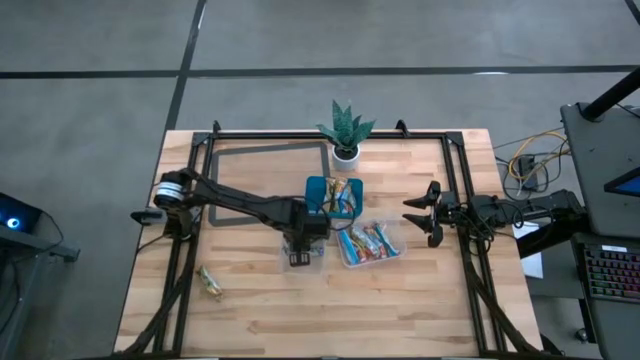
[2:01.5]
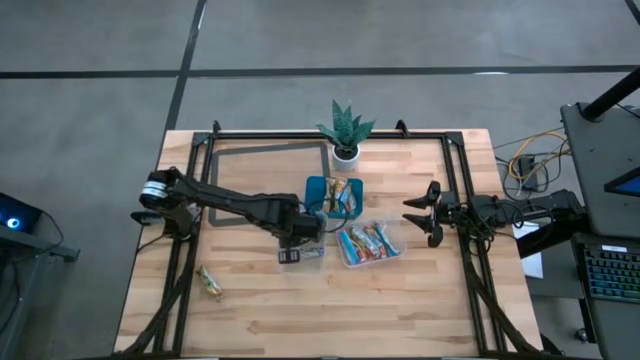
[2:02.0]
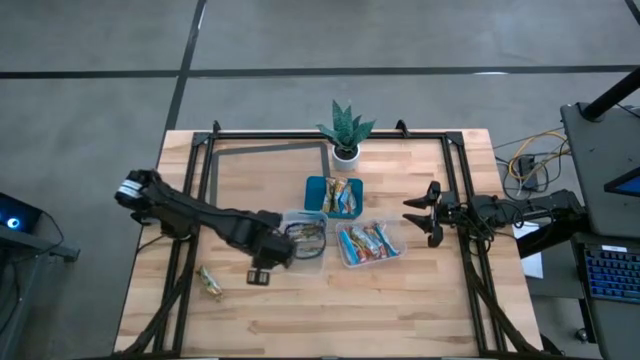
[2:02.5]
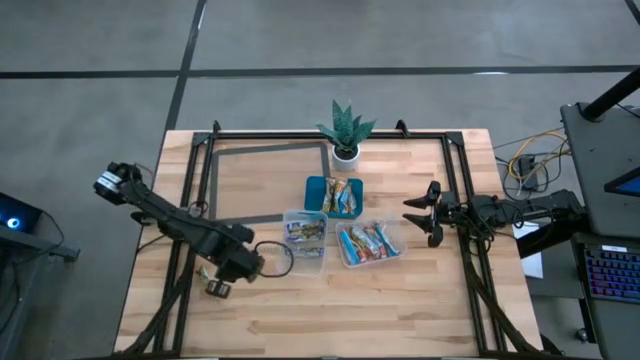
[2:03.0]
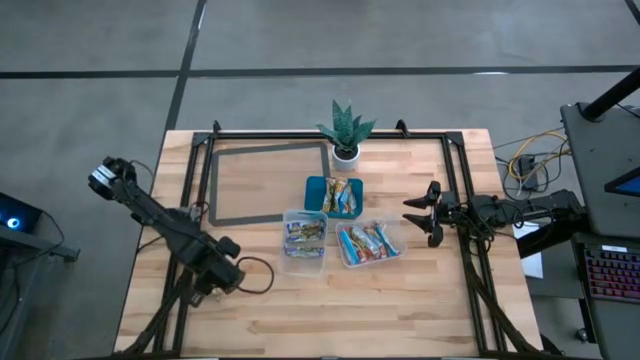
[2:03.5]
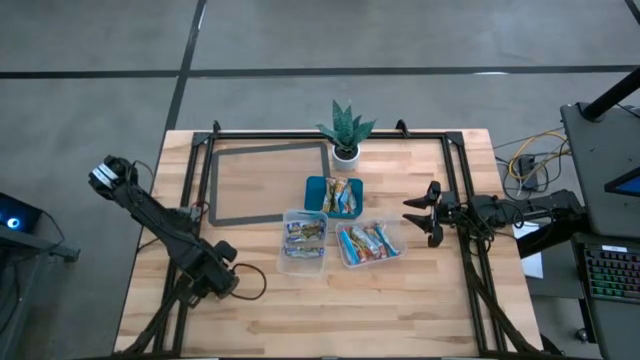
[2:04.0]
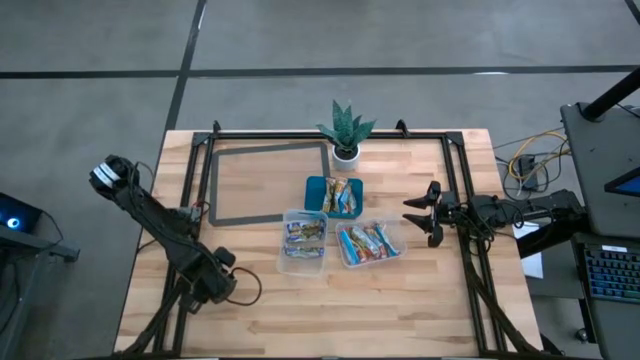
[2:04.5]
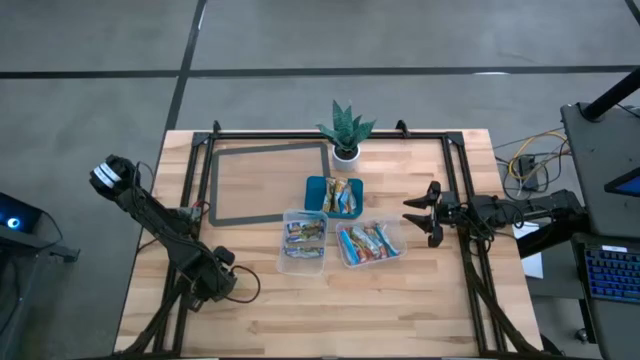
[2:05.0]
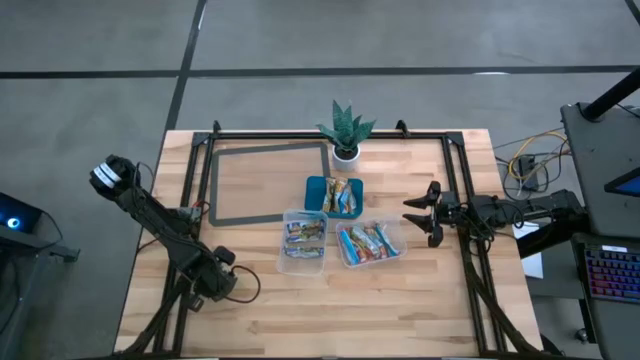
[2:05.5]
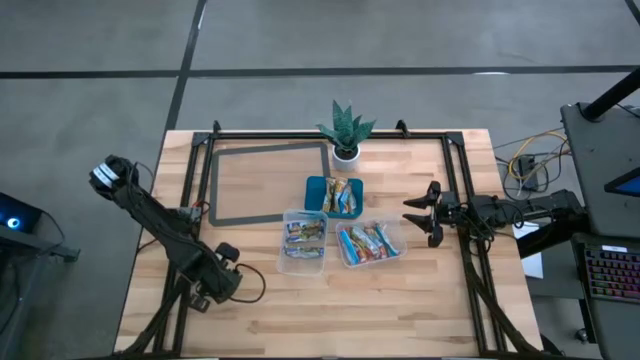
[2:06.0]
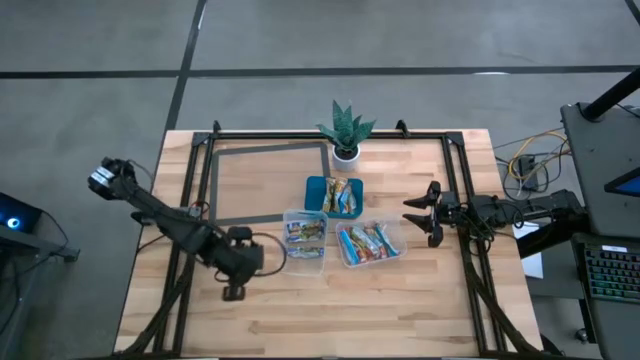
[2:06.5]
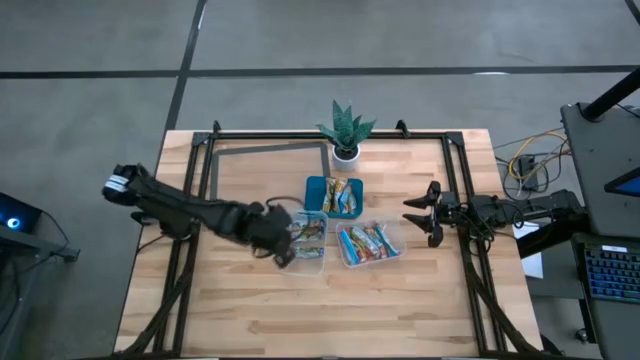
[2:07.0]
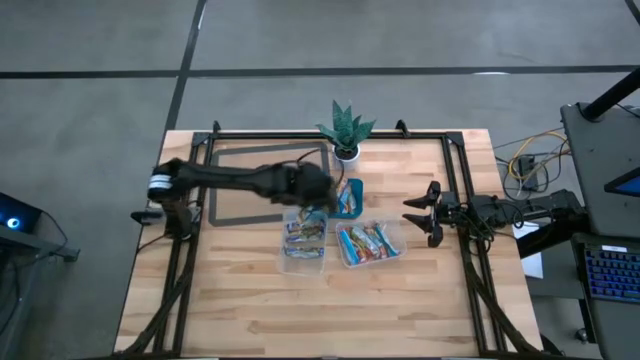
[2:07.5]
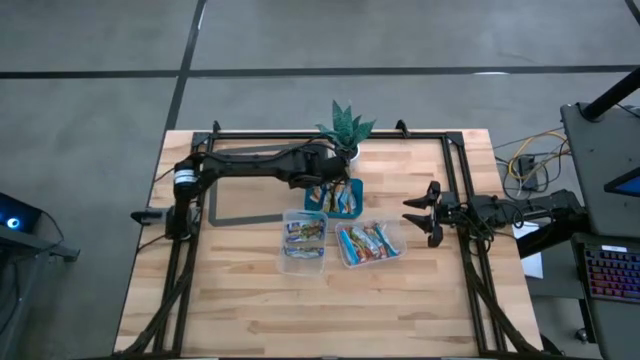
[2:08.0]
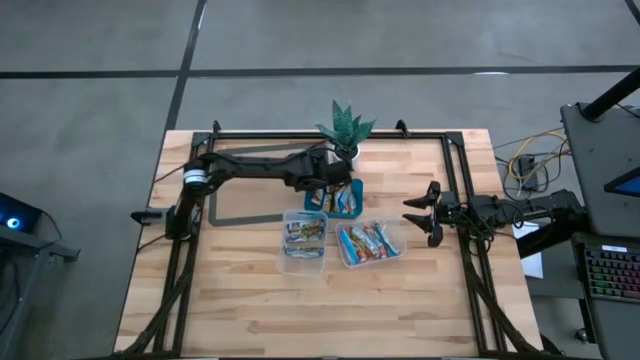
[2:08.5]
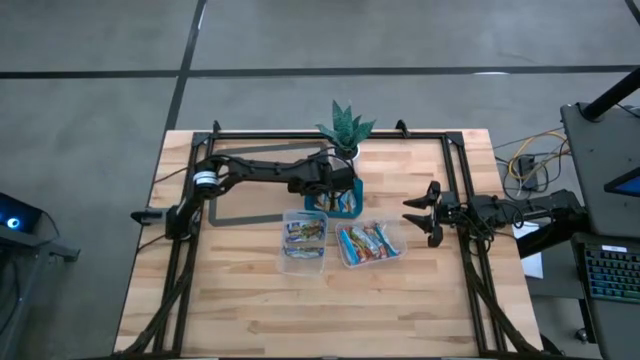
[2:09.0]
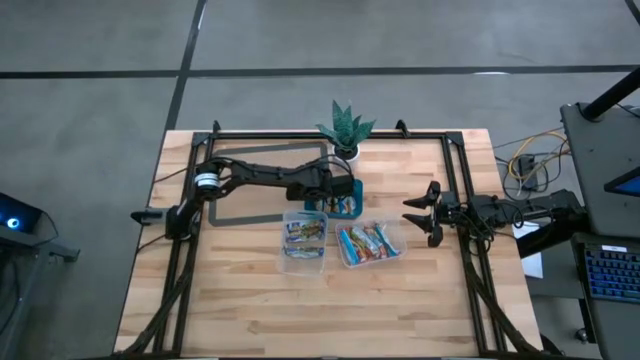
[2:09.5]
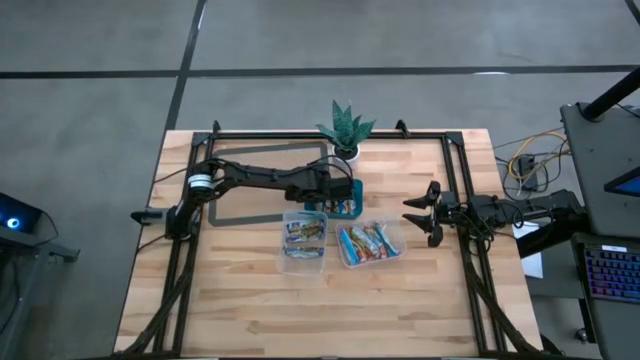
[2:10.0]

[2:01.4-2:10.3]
Task: Pick and place Granola Bars by type
Put the yellow granola bar into the blue bin

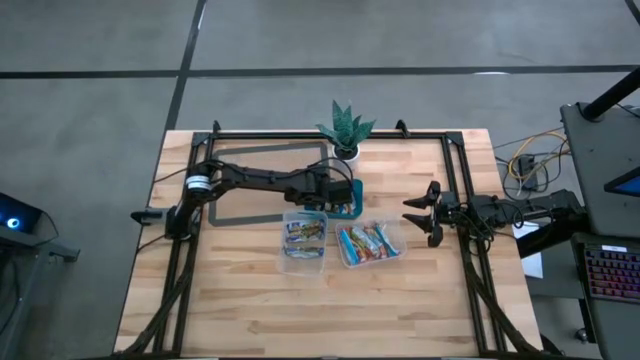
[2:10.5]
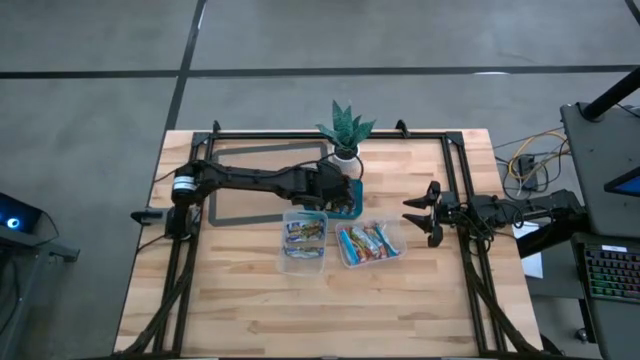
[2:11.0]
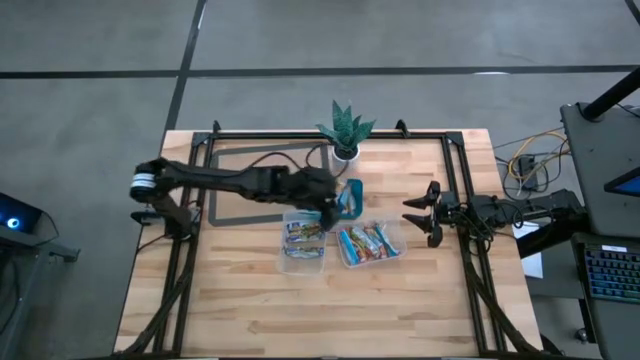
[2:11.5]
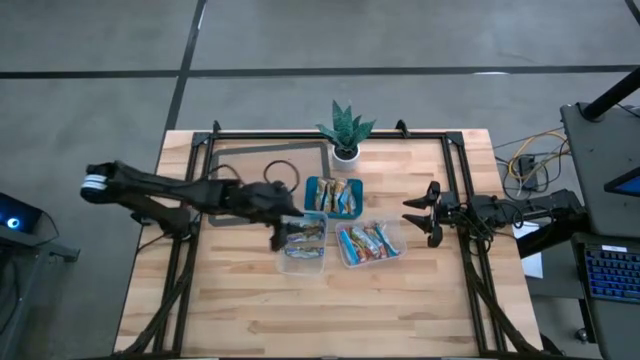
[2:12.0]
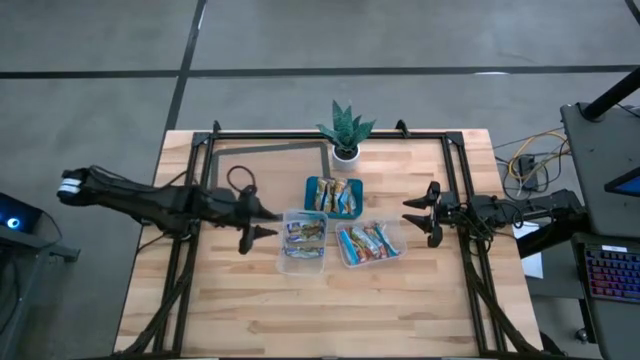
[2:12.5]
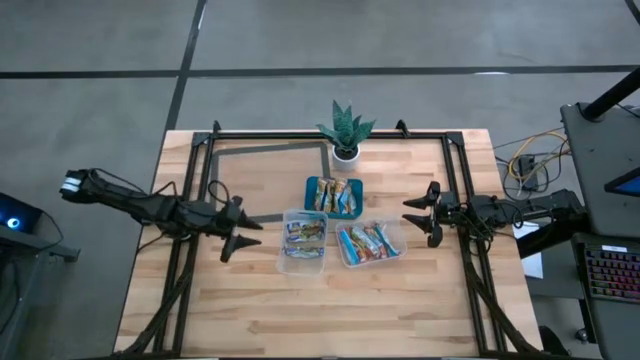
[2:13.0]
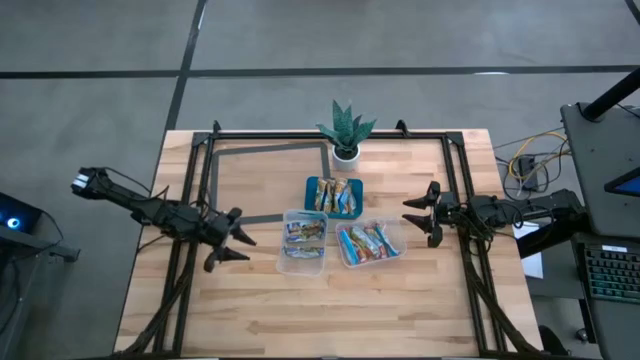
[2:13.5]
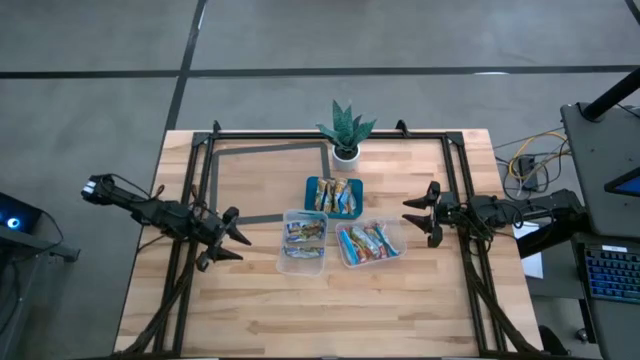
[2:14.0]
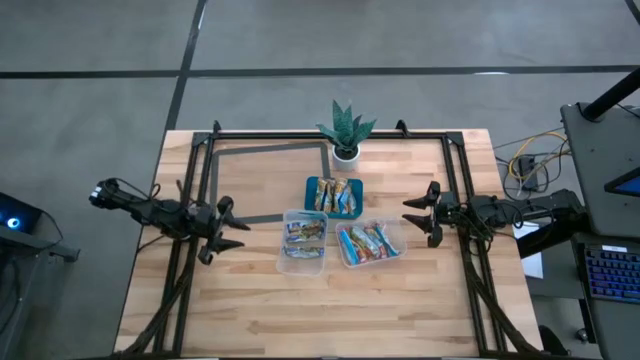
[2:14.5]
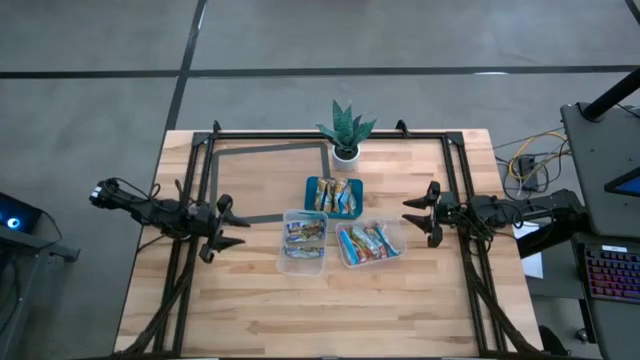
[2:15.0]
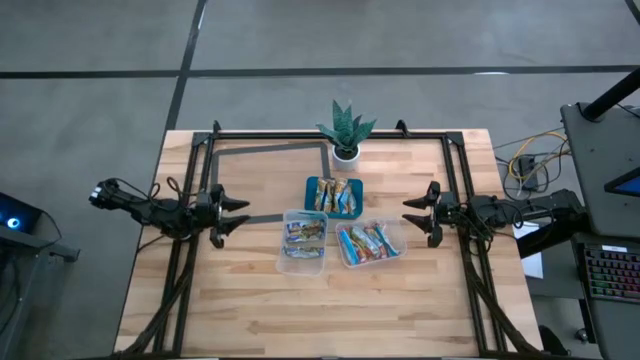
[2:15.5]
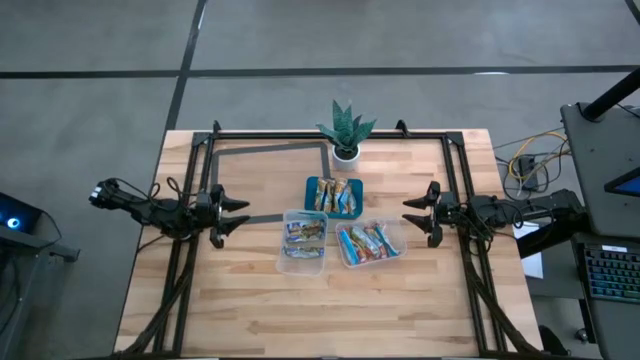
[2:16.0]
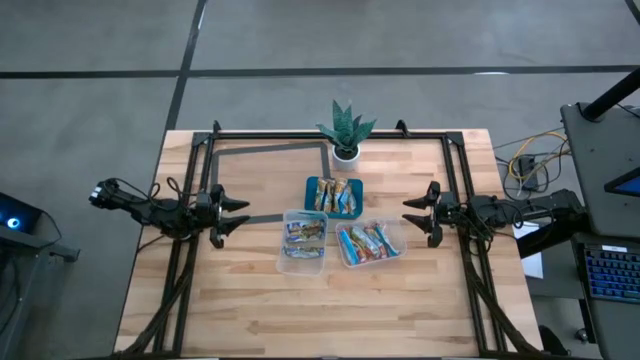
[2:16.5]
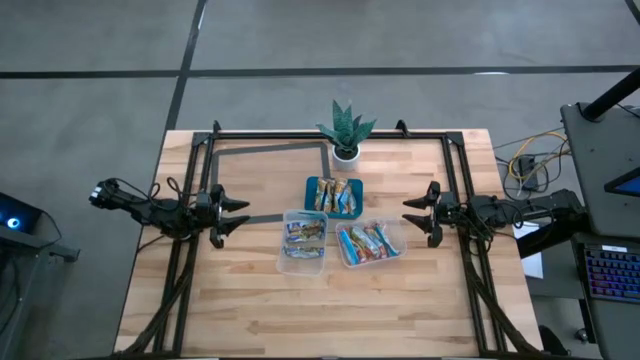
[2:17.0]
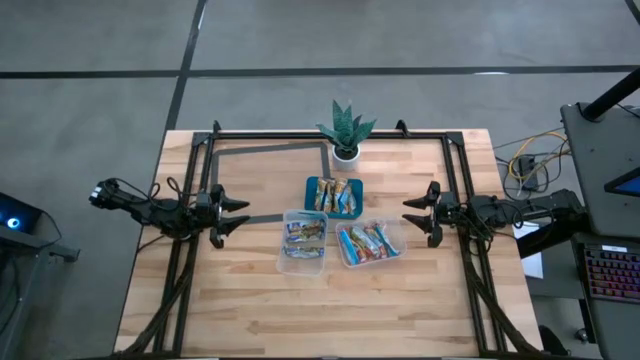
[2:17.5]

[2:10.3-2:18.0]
Return to Home Position

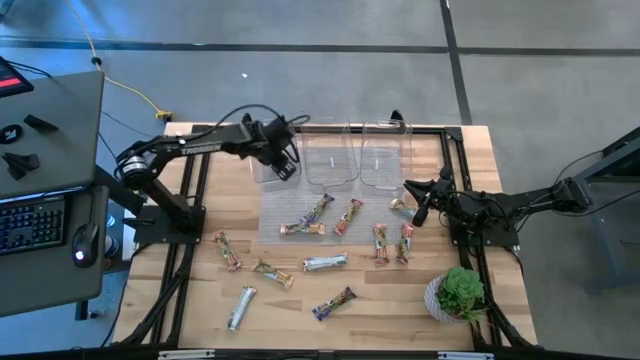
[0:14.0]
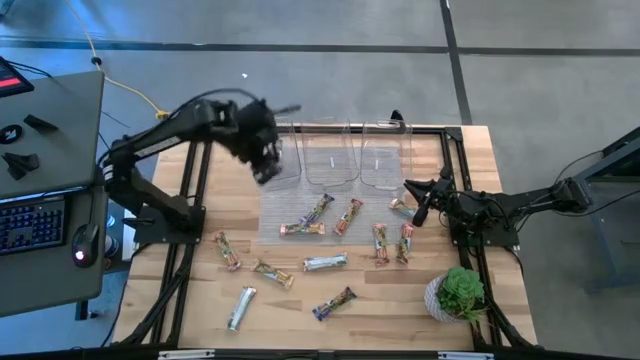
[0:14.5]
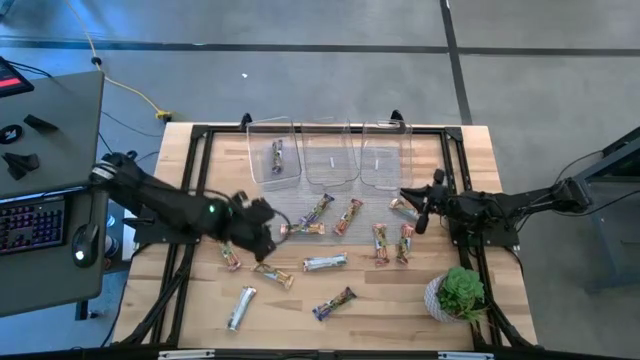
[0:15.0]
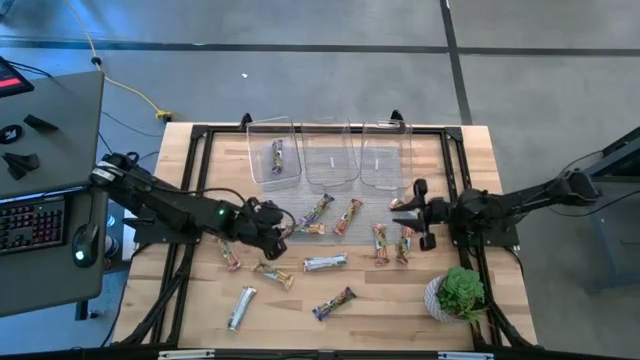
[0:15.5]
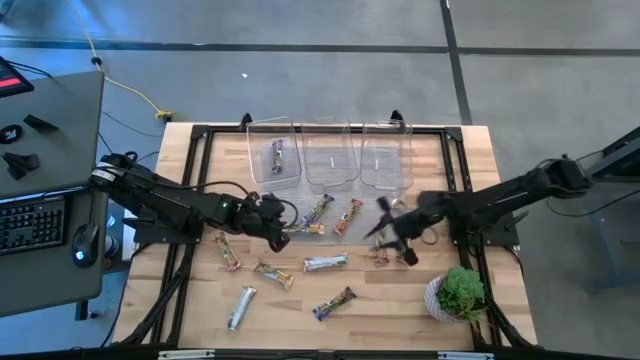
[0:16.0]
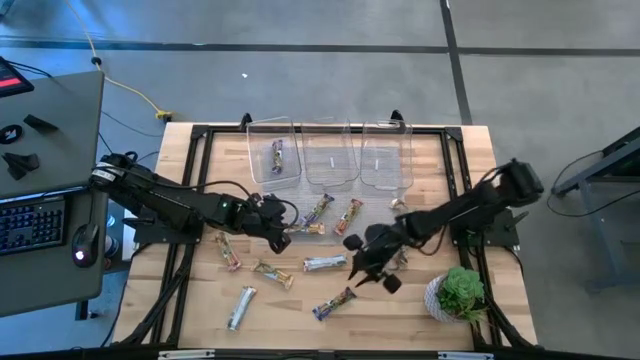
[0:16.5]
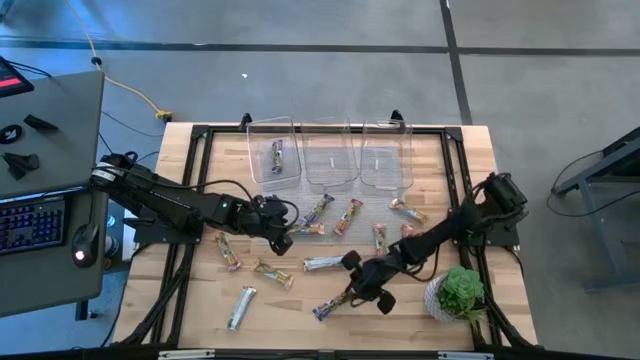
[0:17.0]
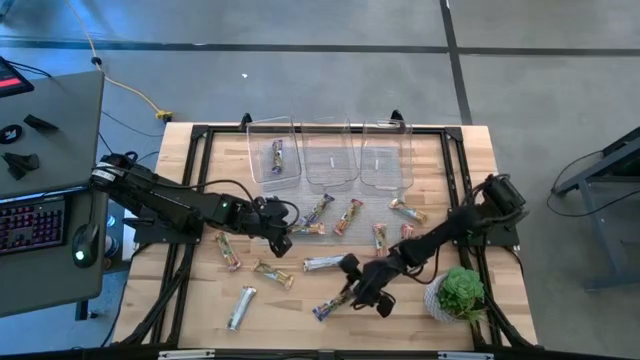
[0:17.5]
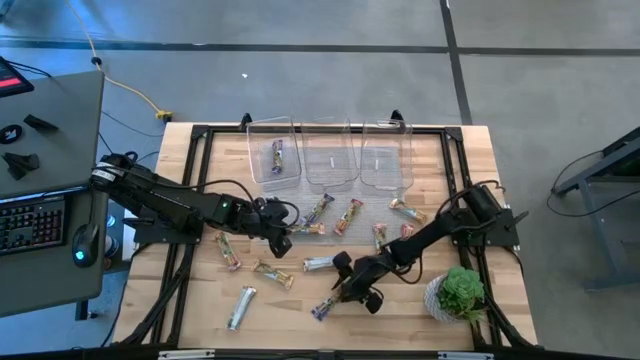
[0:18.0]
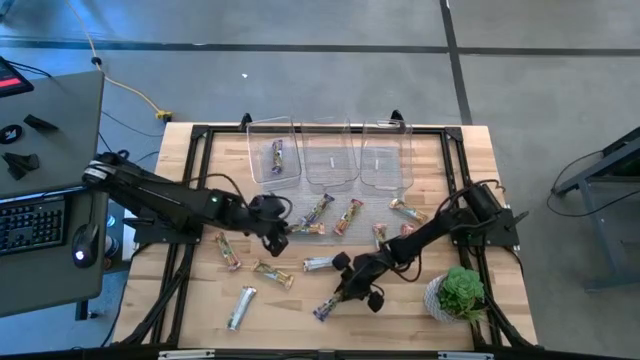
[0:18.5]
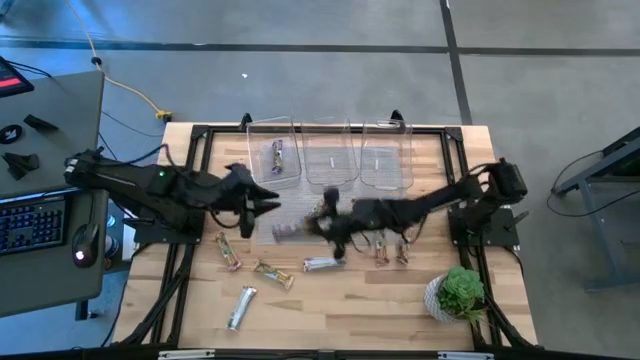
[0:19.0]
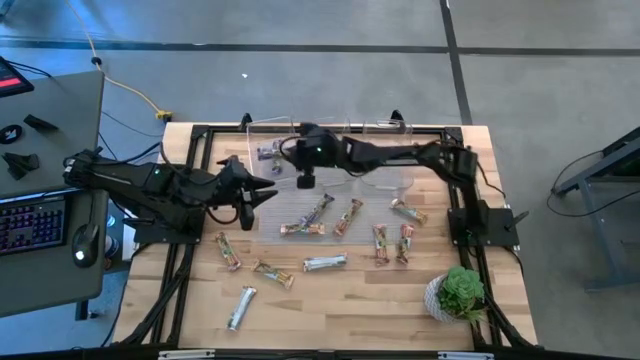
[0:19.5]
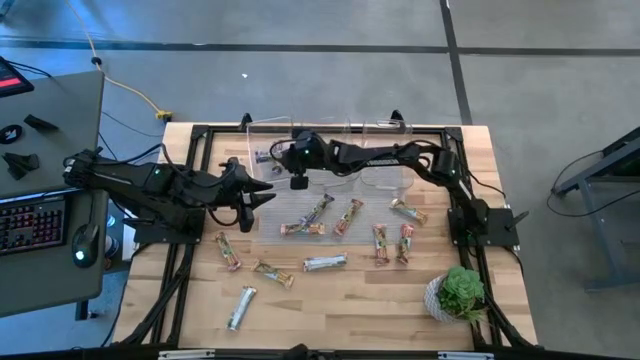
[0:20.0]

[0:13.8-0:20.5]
Task: Pick and place Granola Bars by type
Put the blue granola bar into the left transparent bin
